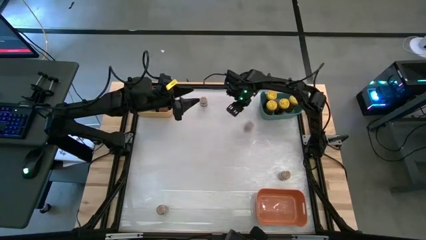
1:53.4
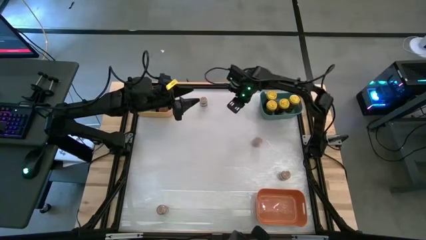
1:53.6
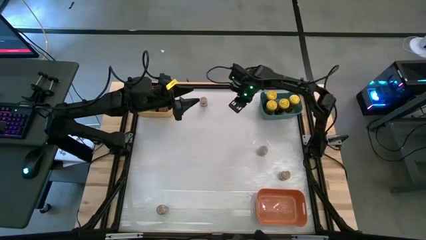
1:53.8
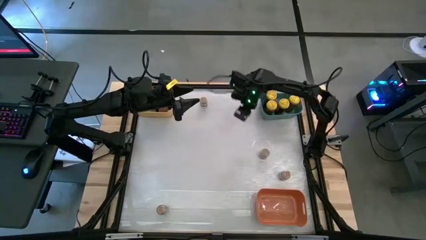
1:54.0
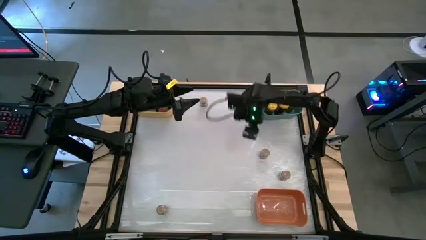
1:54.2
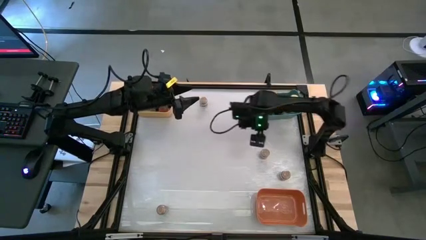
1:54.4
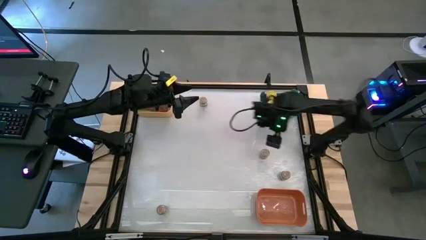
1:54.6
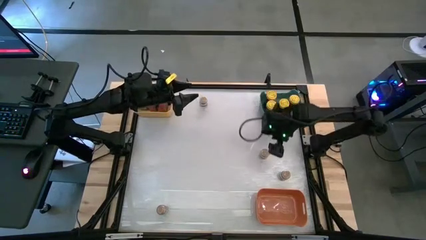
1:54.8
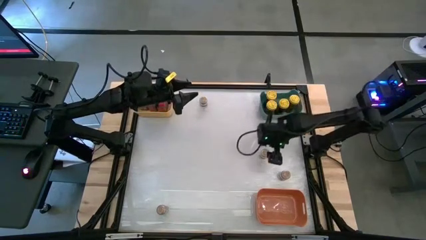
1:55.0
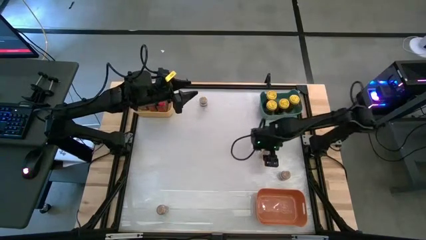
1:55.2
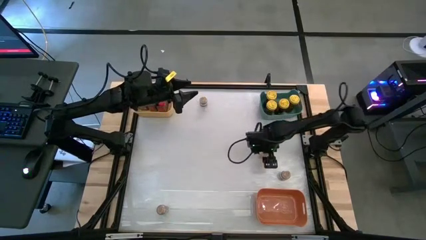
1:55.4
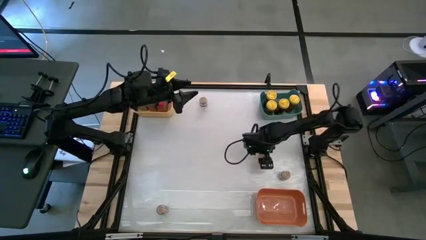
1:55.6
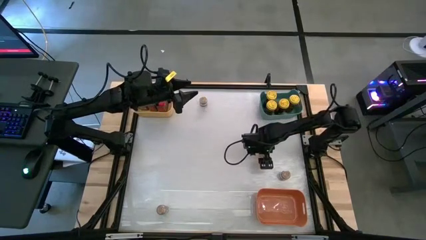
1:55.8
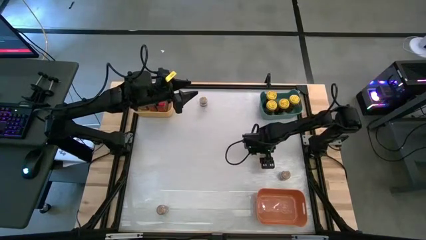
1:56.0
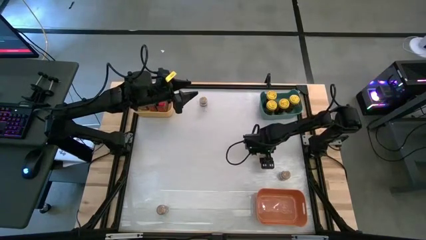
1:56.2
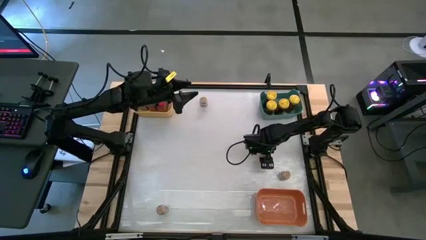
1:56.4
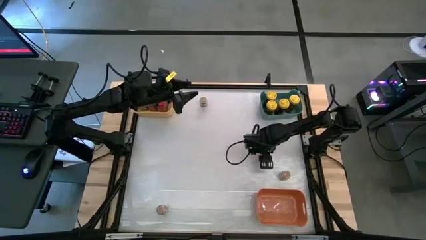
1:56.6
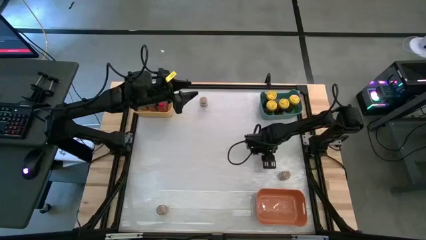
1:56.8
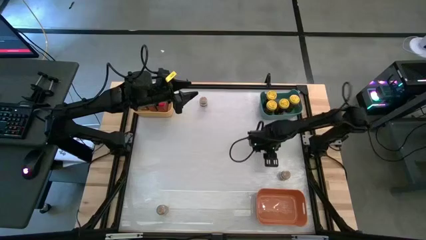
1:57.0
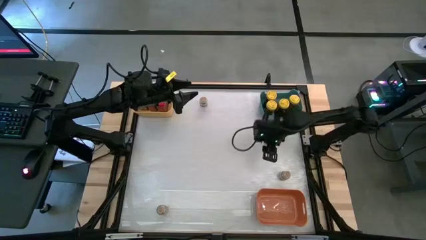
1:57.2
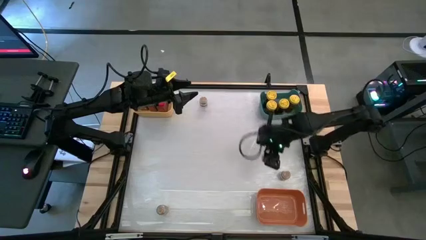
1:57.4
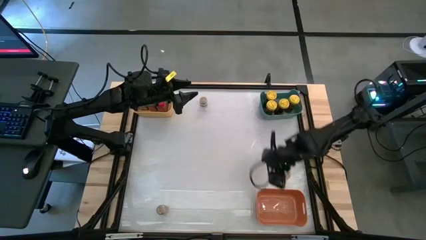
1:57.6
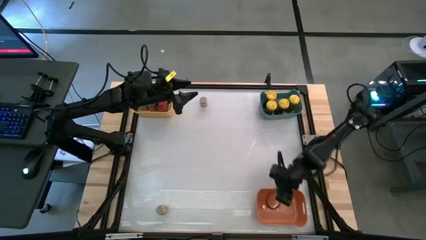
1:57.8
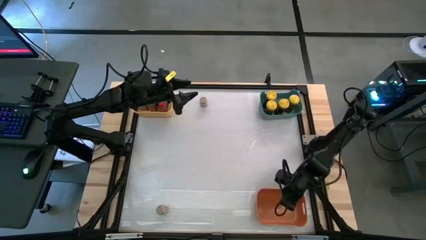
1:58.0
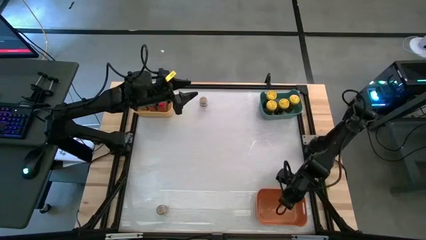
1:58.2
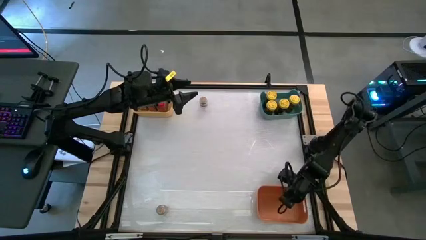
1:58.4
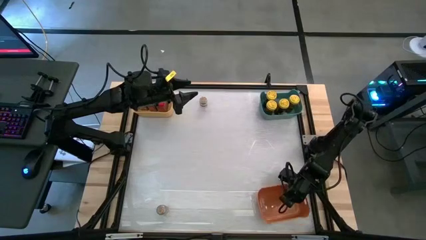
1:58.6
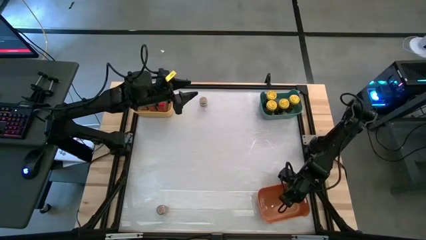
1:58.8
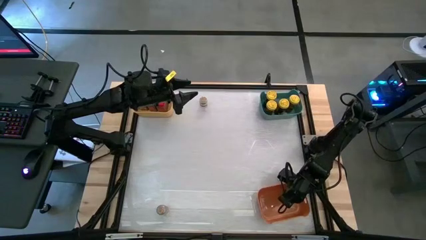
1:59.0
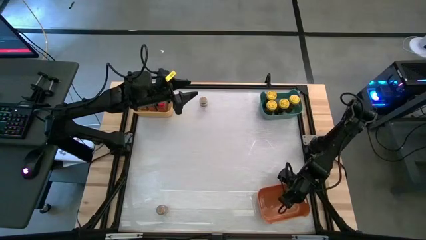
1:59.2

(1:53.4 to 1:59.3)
Task: Sort spices by type
Put the top right brown seasoning bottle into the orange bin

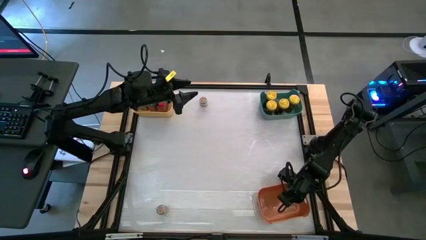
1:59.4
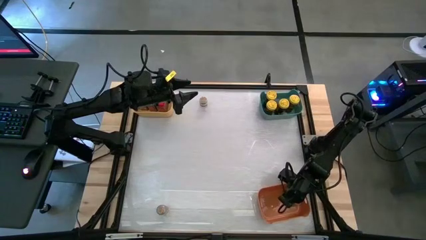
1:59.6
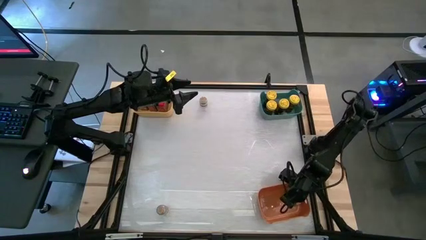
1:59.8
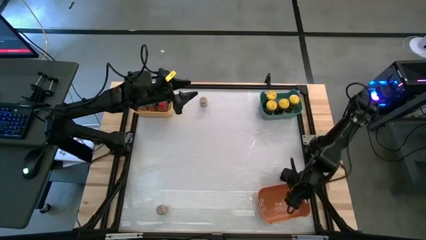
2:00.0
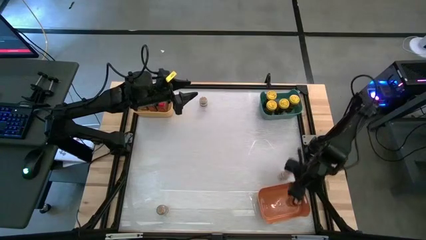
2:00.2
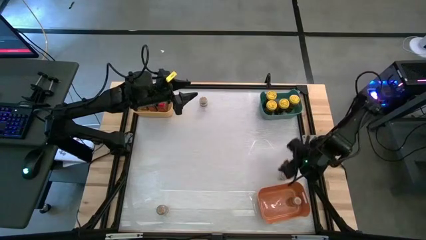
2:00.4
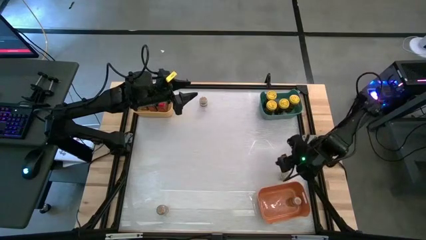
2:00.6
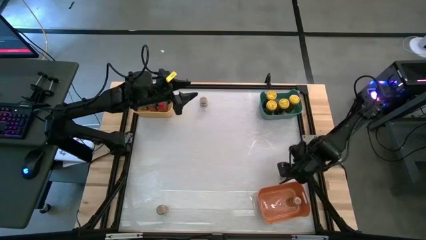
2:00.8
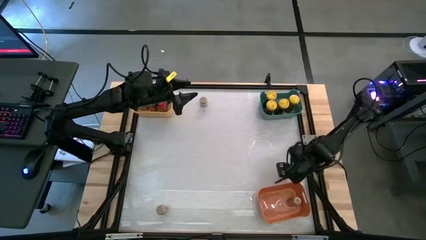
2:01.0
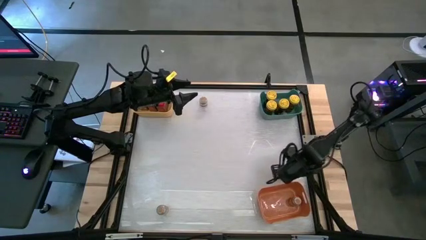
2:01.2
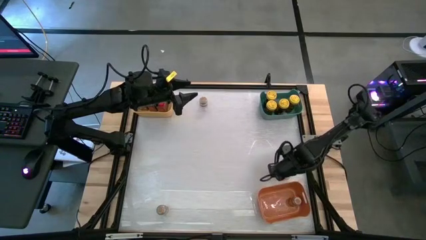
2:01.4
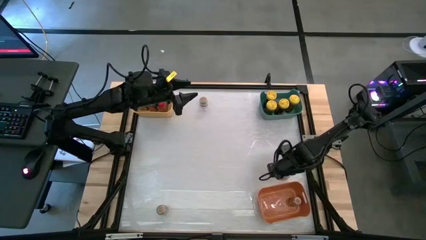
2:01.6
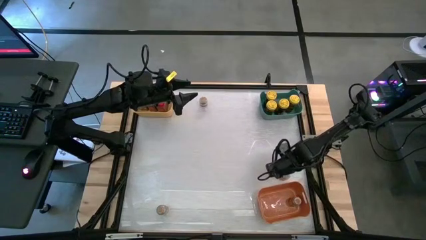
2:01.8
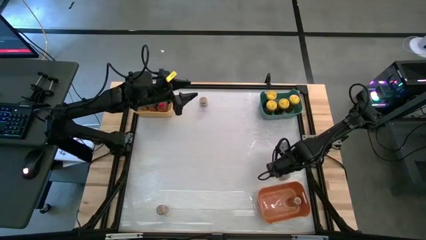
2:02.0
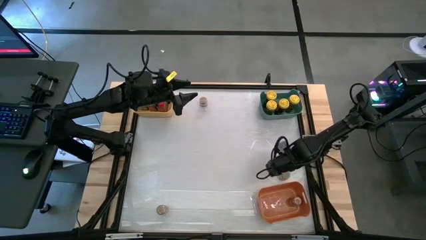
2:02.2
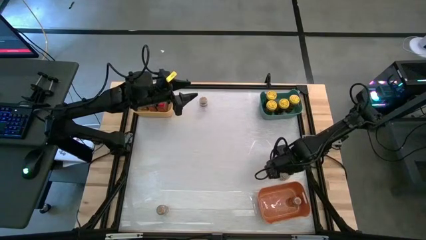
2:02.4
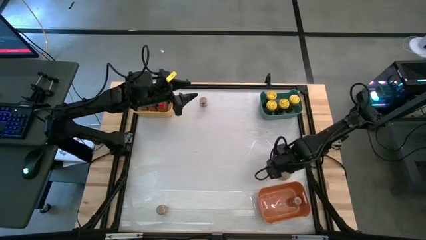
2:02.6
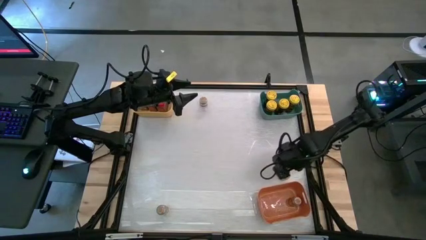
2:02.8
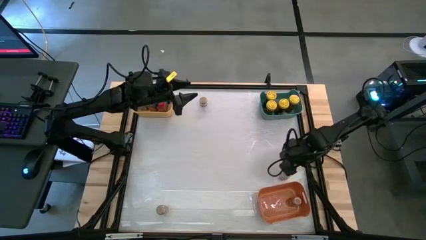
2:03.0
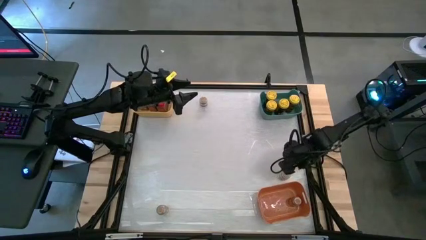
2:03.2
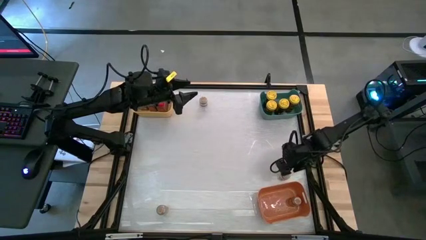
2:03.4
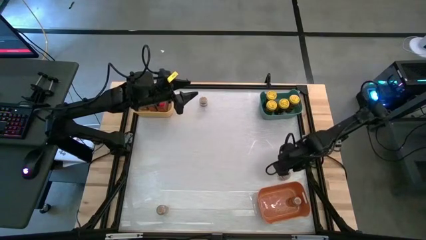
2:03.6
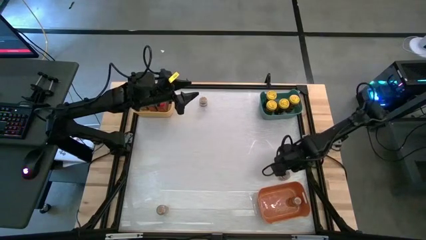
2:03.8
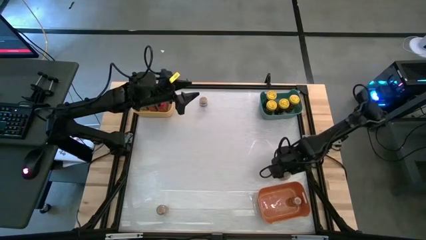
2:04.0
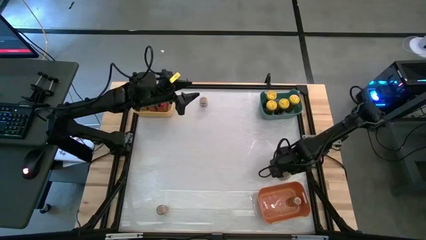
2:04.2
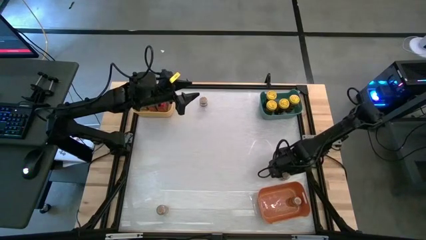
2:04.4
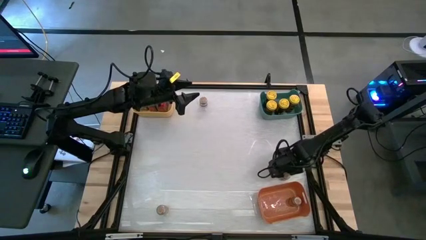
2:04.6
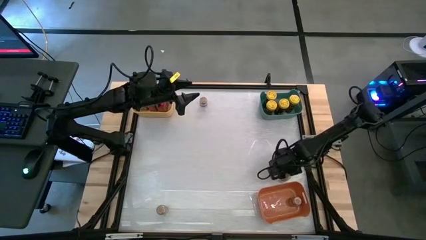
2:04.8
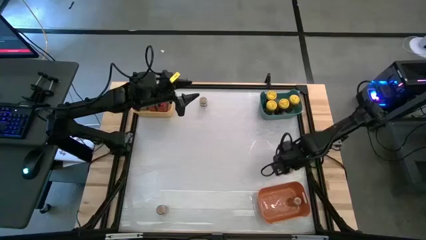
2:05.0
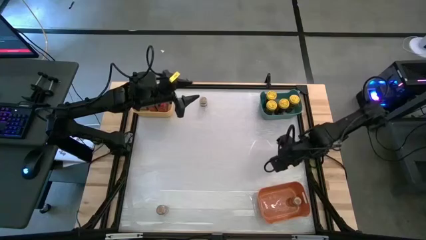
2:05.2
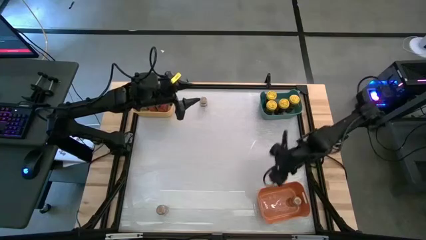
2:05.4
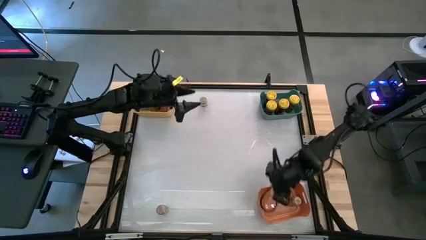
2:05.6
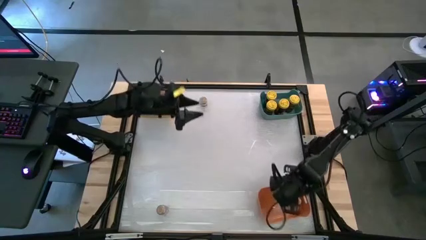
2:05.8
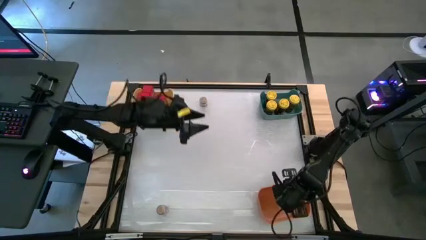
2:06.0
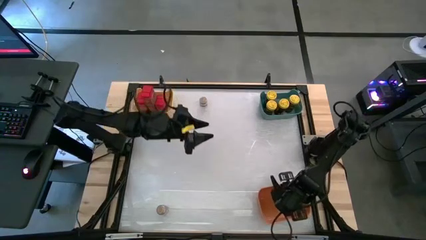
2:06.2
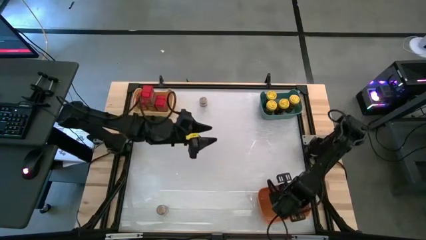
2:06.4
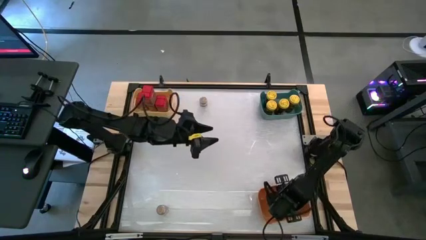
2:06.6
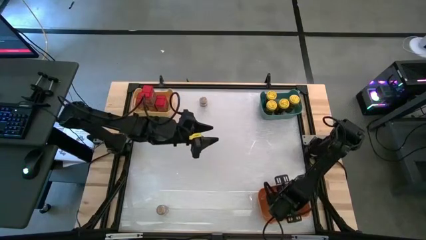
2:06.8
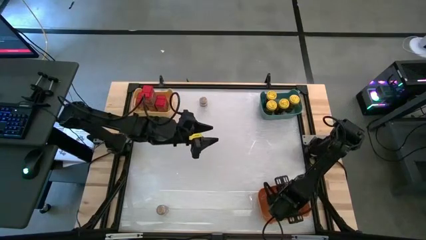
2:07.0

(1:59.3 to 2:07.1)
Put the right brown seasoning bottle into the orange bin

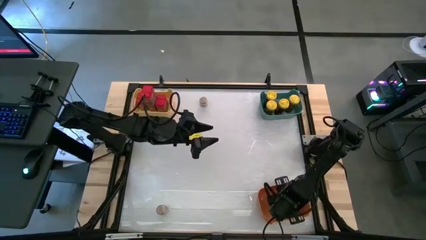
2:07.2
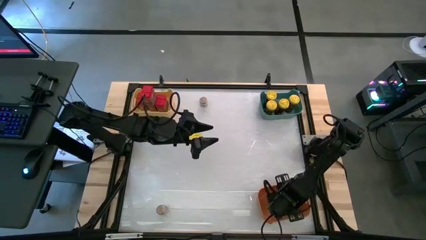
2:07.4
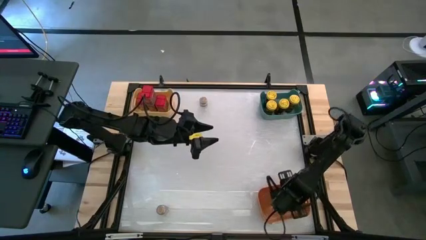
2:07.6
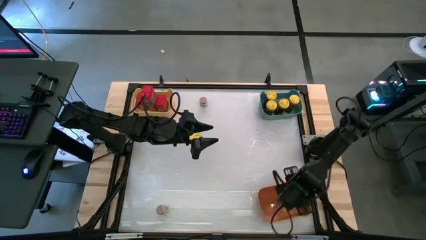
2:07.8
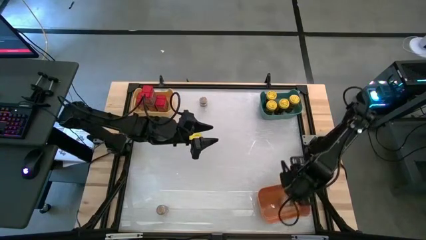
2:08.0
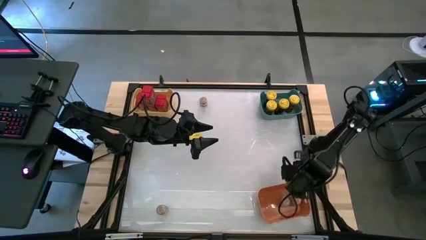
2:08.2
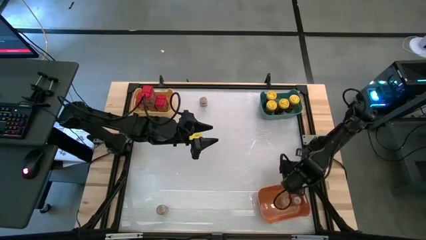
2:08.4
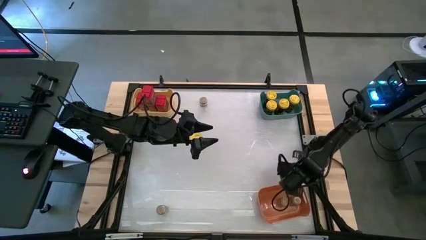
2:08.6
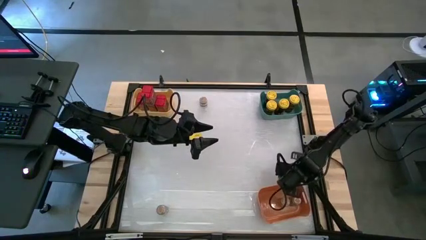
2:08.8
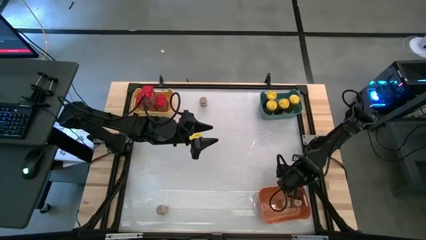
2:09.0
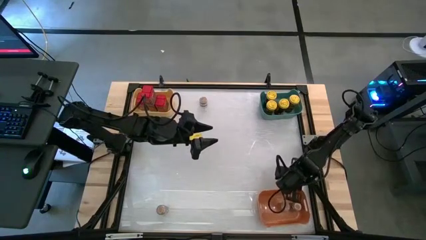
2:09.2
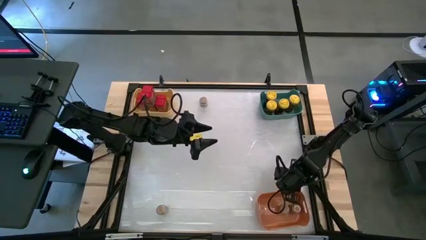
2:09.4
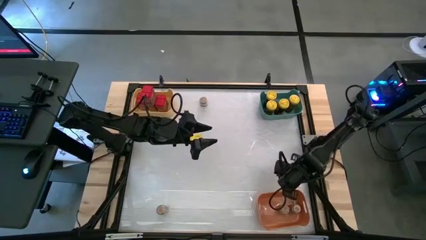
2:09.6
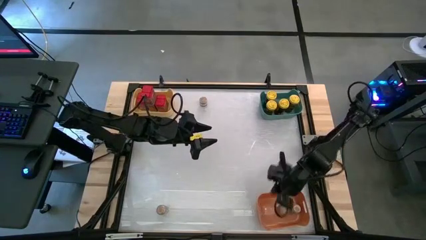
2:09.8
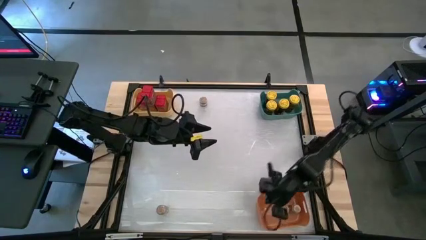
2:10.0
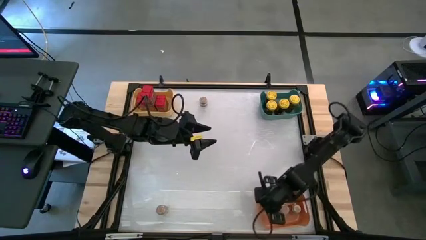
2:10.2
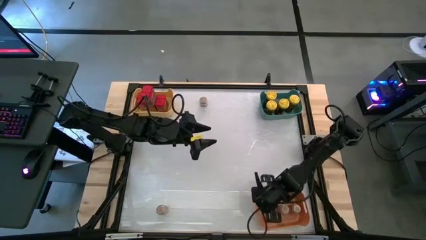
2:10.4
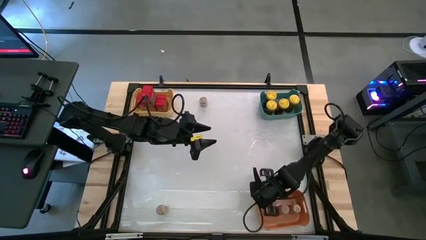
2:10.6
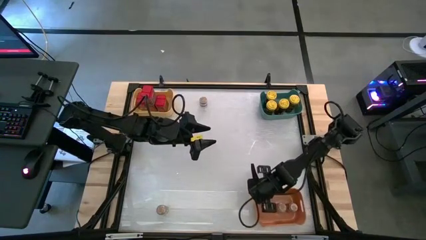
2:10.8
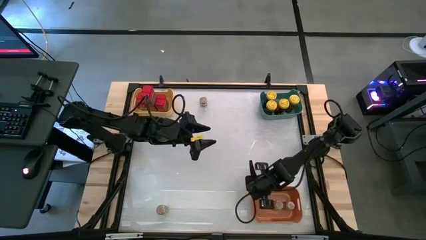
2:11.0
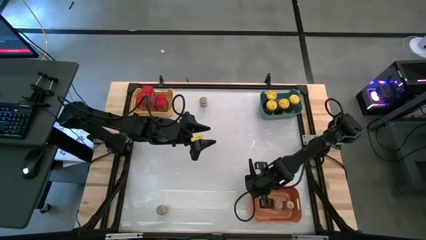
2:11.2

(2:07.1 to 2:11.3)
Adjust the orange bin
